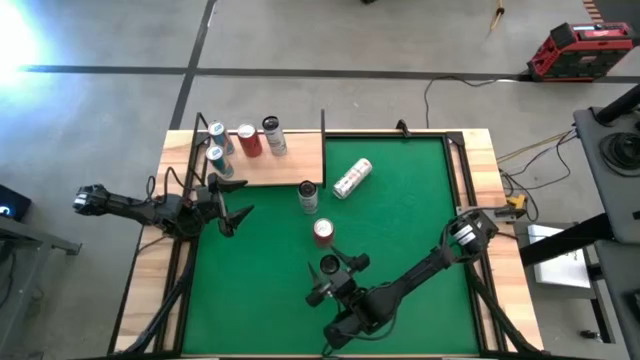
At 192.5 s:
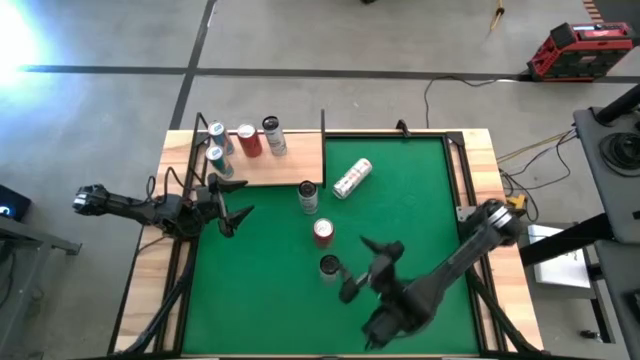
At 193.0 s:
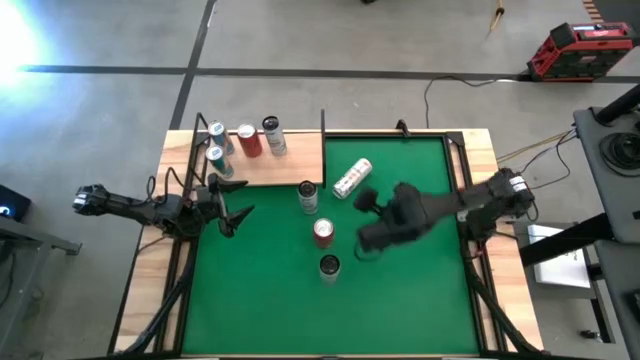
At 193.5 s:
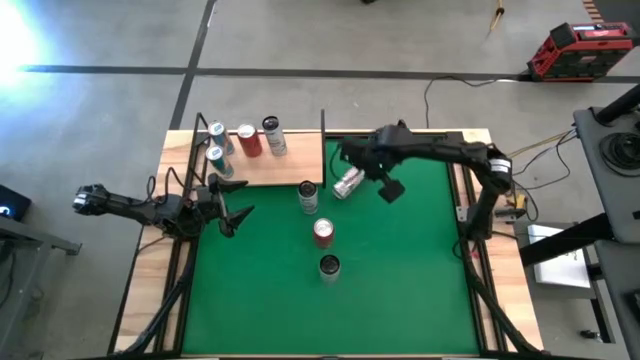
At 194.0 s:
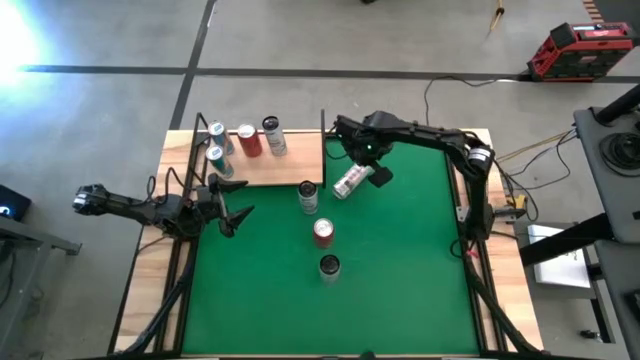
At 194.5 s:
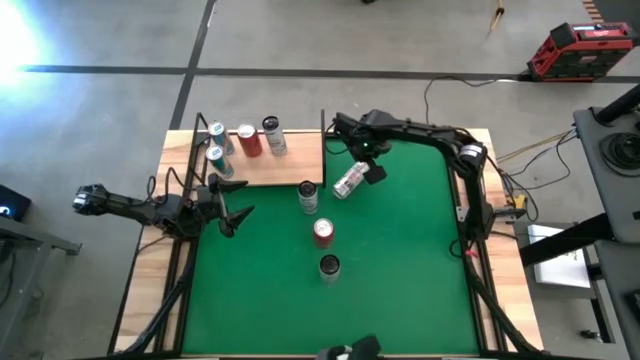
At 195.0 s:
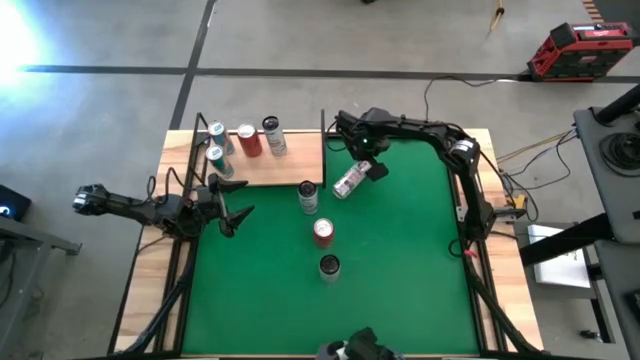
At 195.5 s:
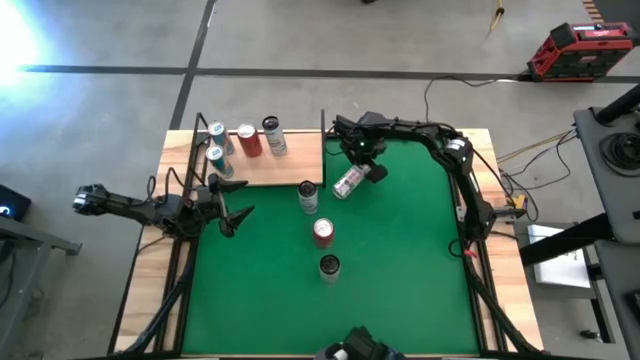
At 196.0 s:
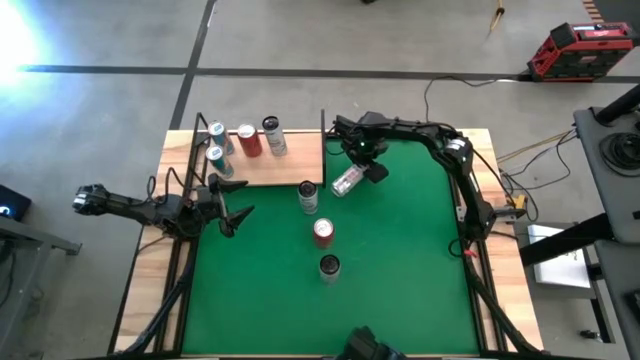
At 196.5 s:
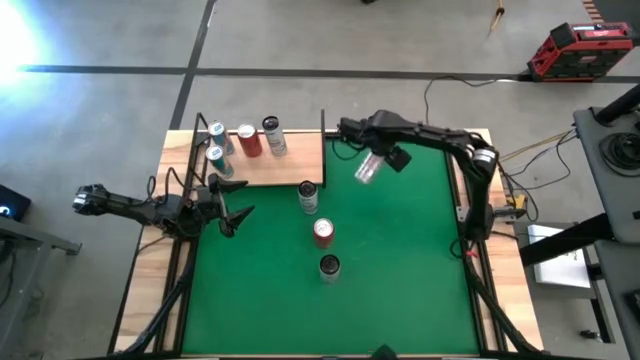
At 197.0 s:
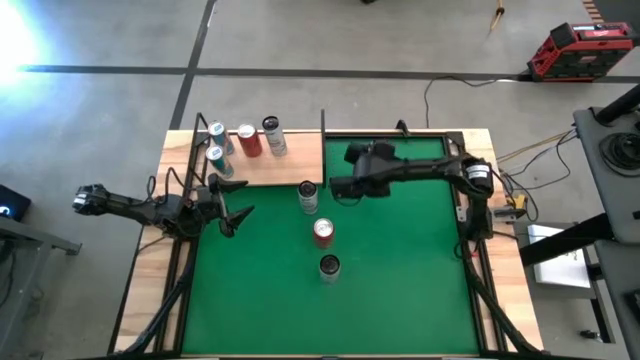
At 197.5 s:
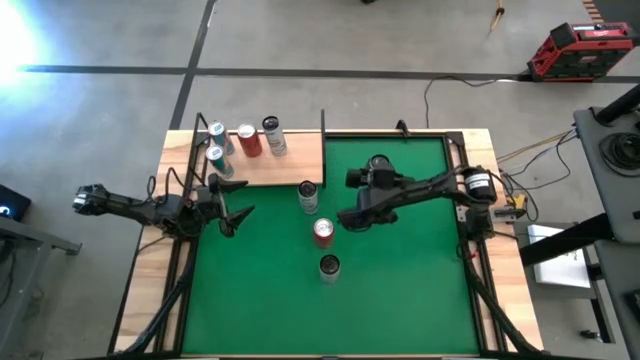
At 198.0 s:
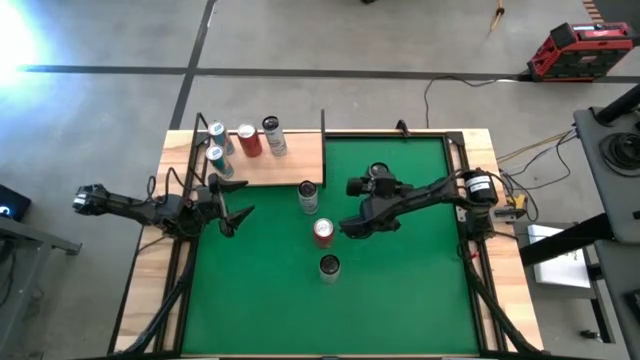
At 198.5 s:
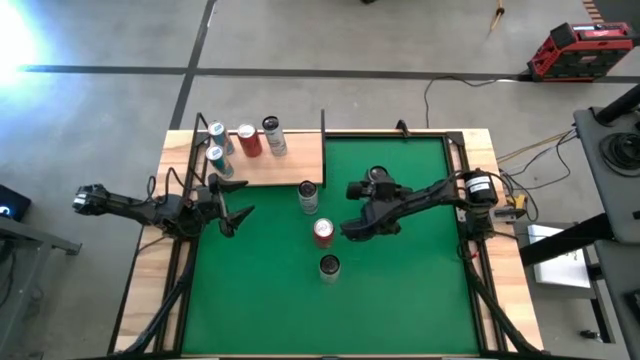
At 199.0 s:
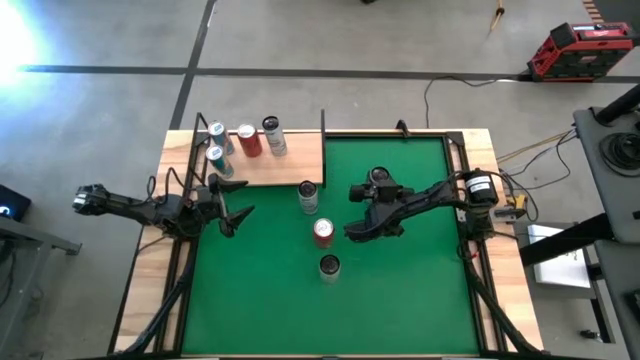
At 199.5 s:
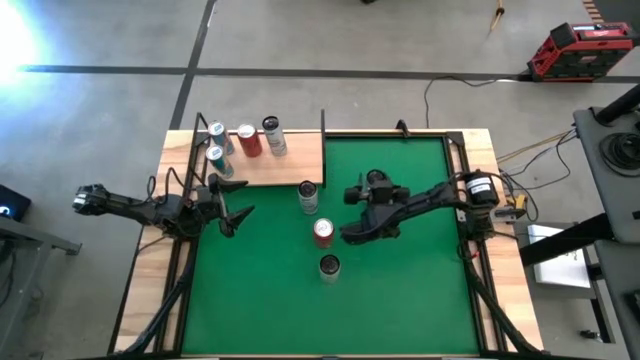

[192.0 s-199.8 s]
Task: Place canned beverage on shelf
Adjust the white yellow soda can on the table

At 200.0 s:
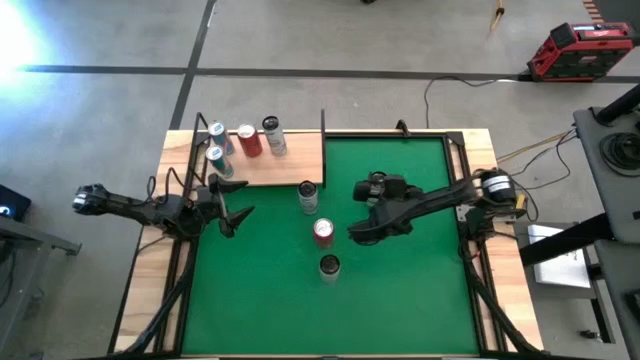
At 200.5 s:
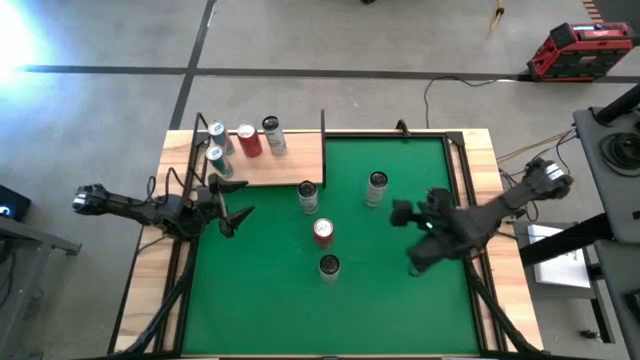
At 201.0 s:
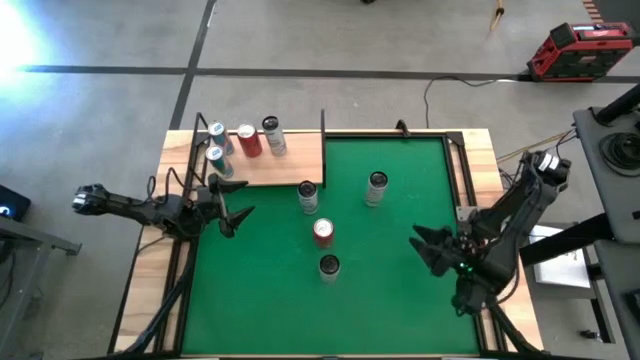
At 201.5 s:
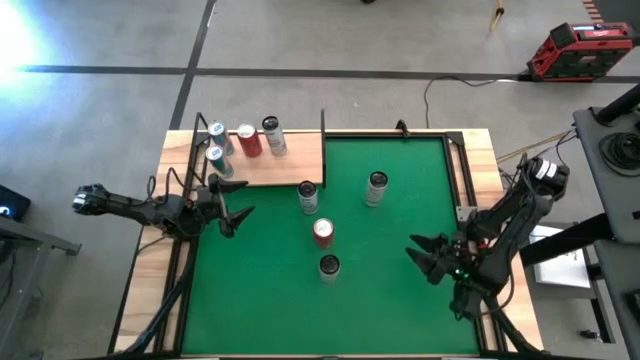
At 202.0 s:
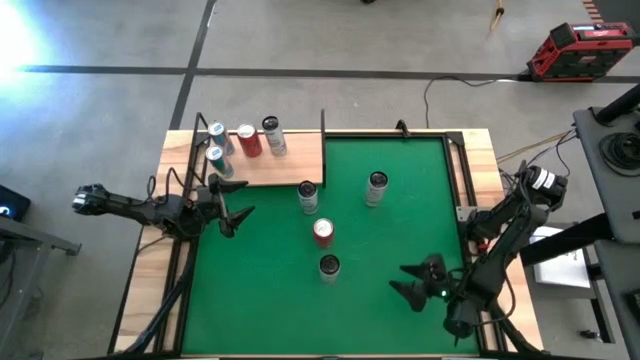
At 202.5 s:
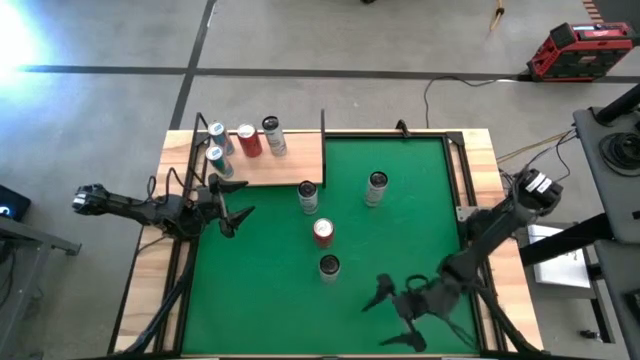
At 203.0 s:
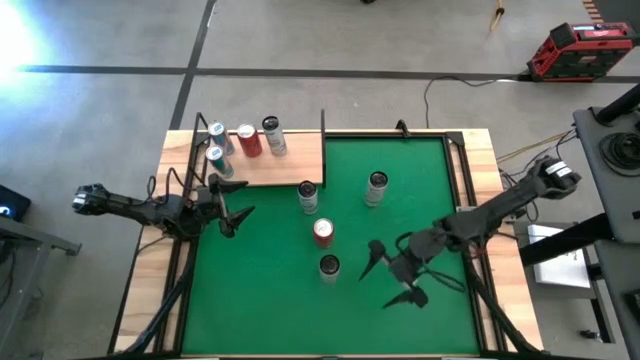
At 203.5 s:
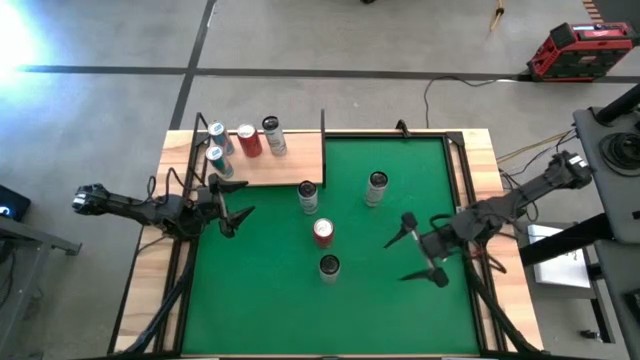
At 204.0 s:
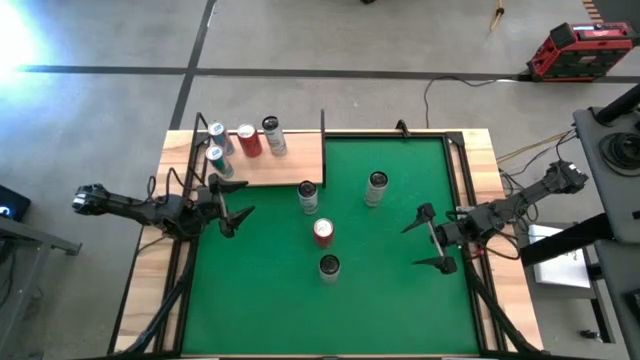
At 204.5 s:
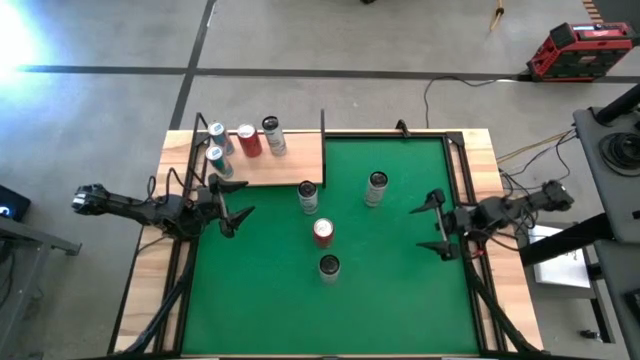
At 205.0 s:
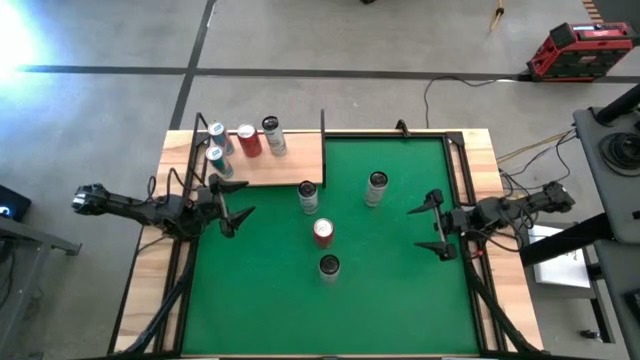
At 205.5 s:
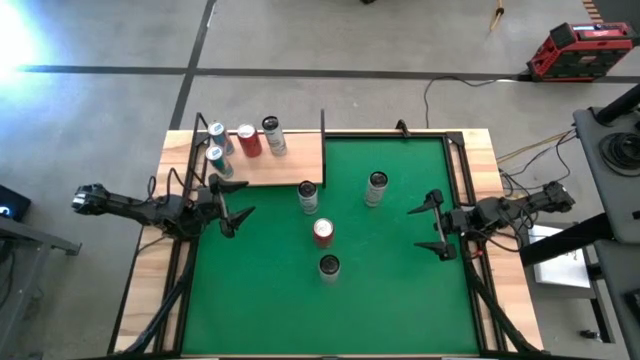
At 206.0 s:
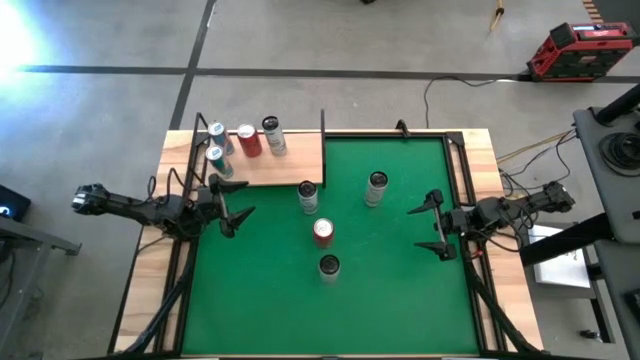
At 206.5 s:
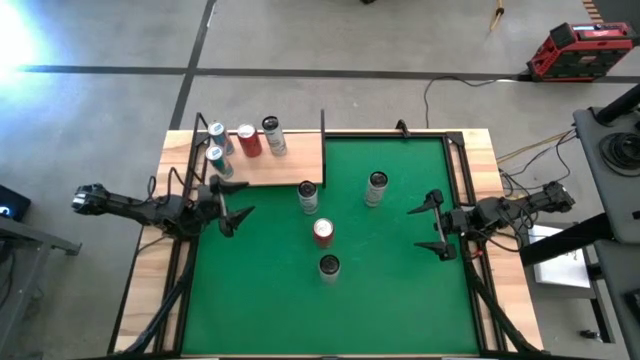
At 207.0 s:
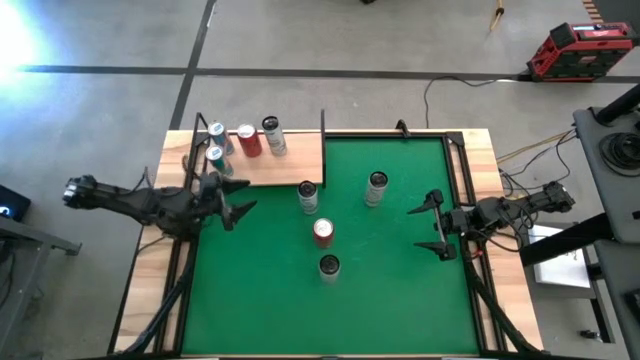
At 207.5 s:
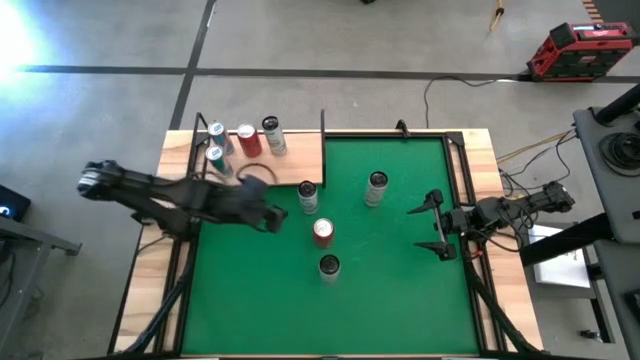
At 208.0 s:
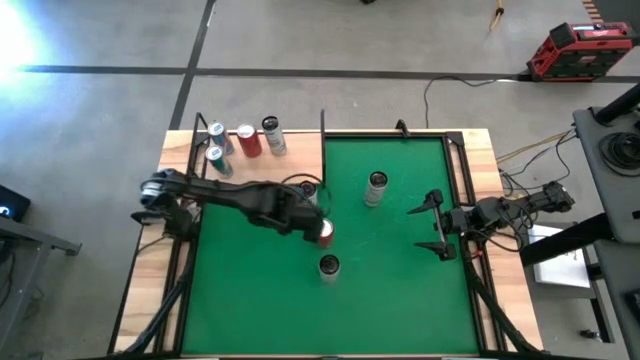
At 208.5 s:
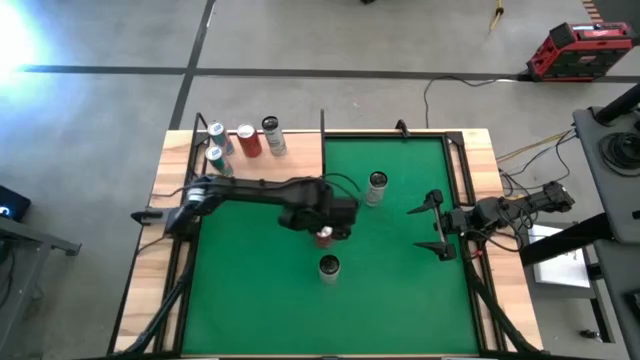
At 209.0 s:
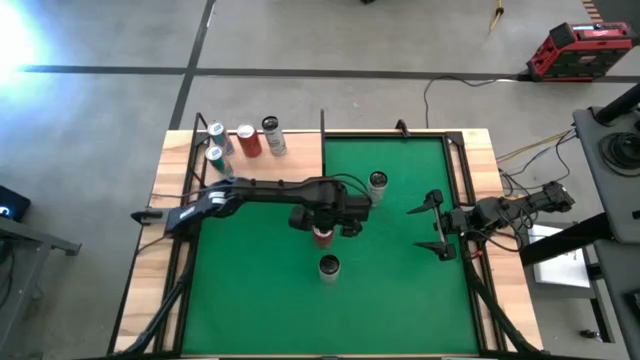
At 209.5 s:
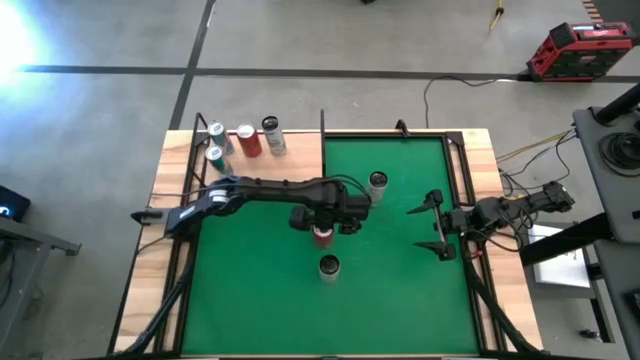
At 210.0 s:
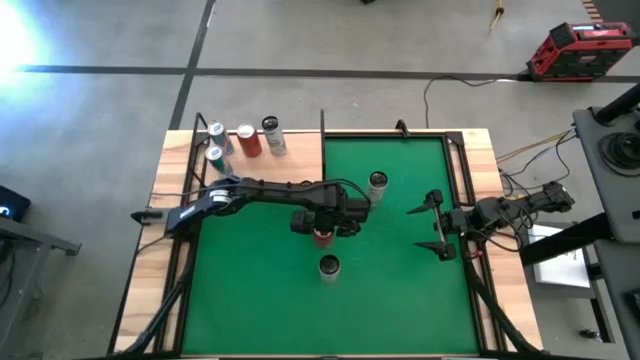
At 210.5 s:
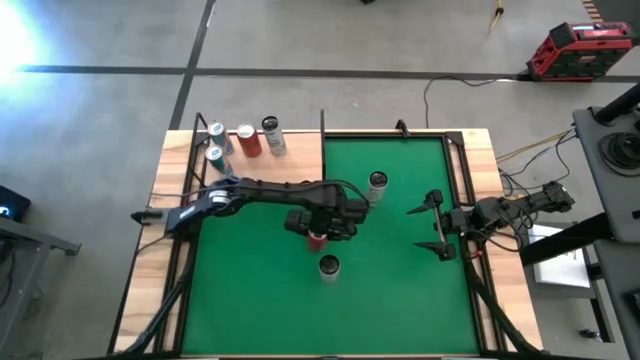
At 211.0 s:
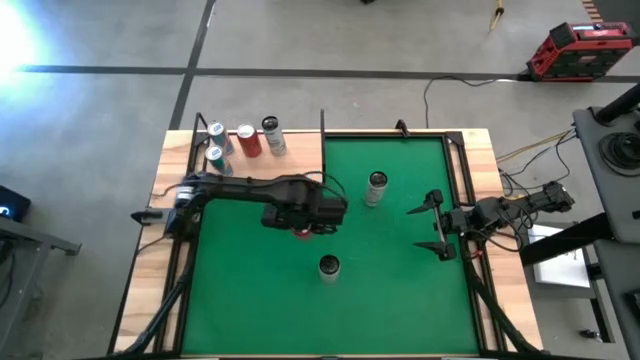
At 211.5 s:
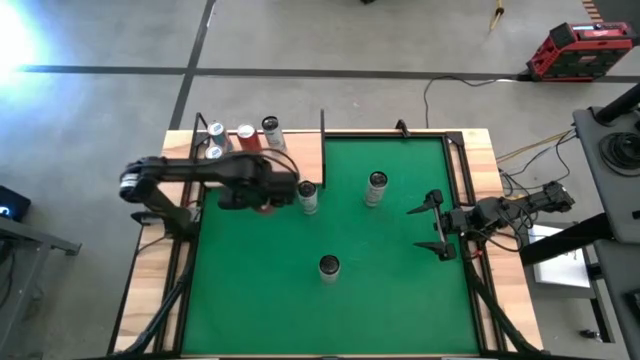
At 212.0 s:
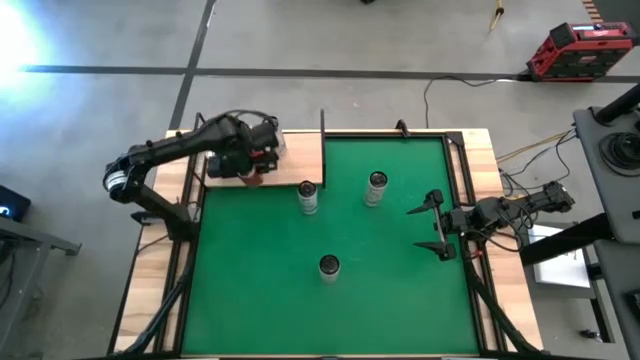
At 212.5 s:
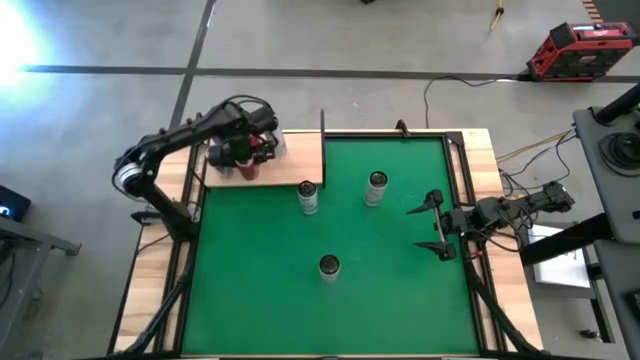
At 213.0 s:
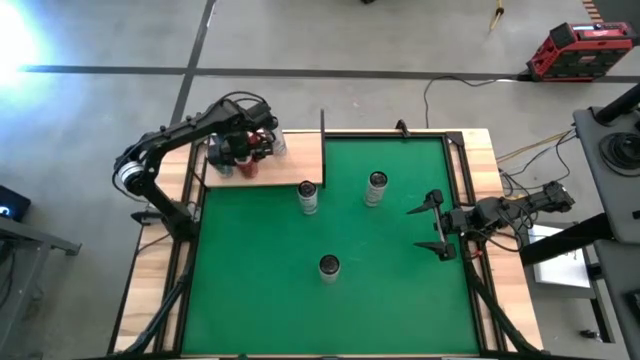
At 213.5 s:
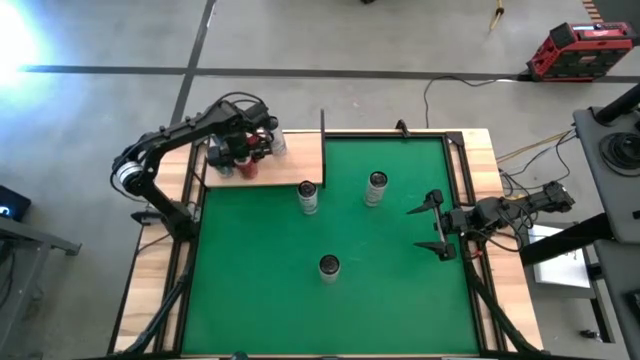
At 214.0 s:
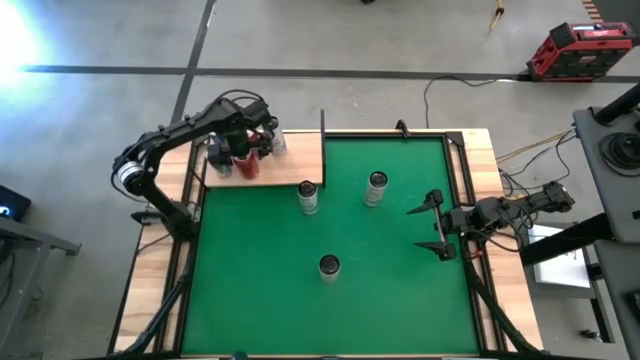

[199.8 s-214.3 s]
Put the red soda can on the shelf aligned with the other red soda can
